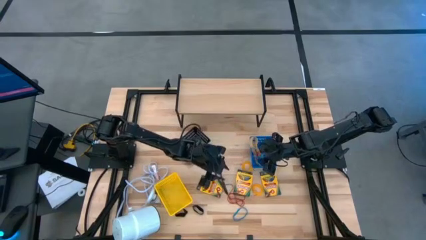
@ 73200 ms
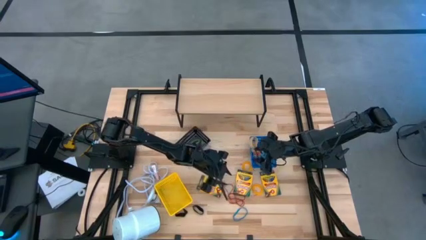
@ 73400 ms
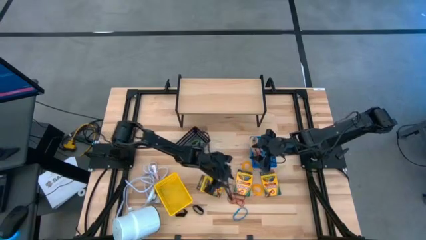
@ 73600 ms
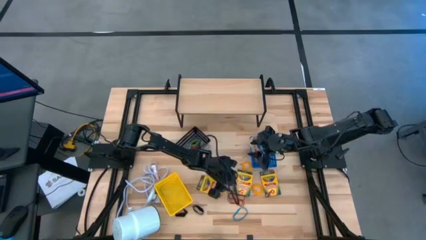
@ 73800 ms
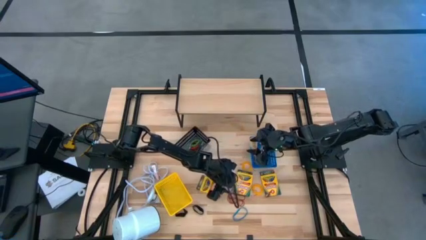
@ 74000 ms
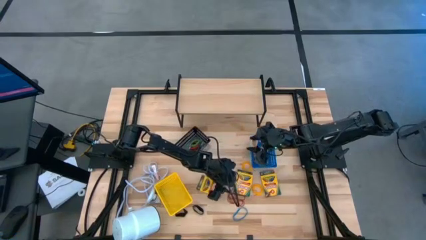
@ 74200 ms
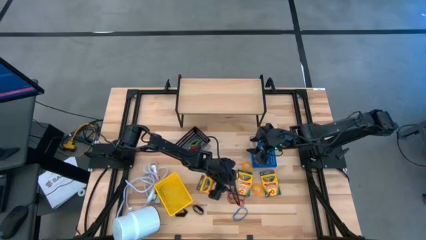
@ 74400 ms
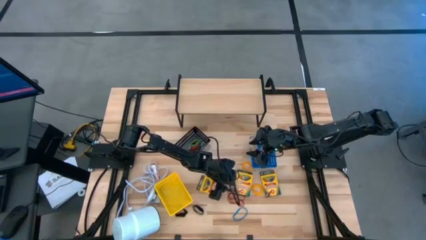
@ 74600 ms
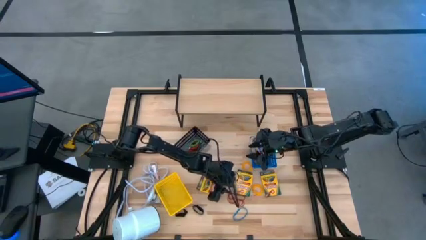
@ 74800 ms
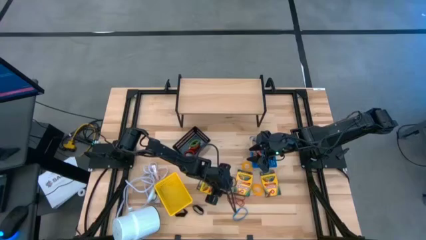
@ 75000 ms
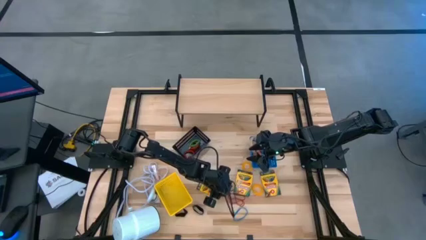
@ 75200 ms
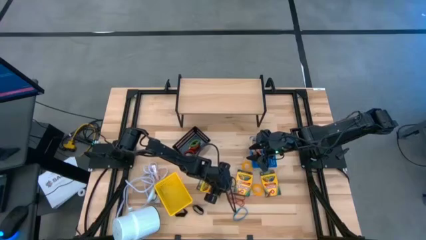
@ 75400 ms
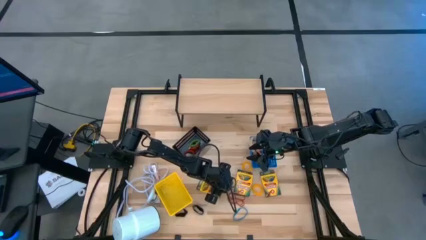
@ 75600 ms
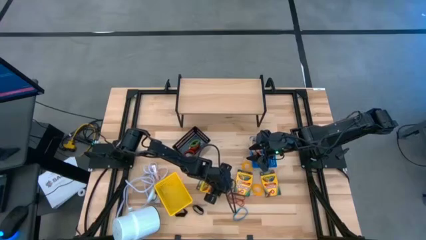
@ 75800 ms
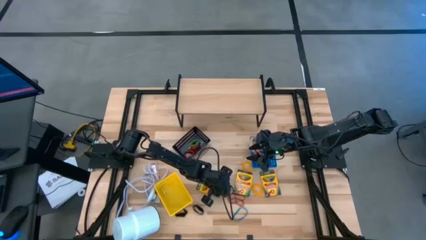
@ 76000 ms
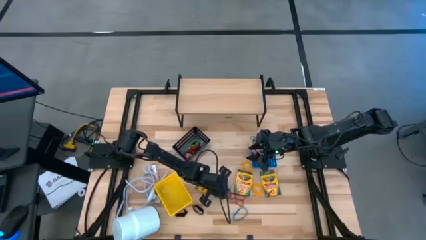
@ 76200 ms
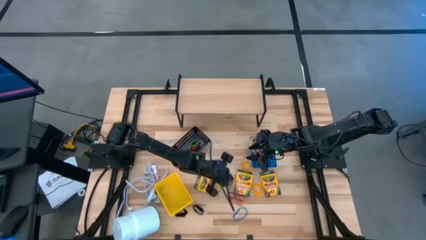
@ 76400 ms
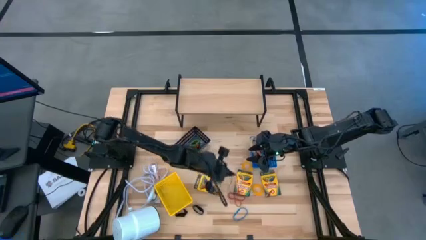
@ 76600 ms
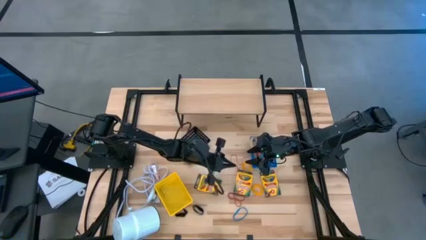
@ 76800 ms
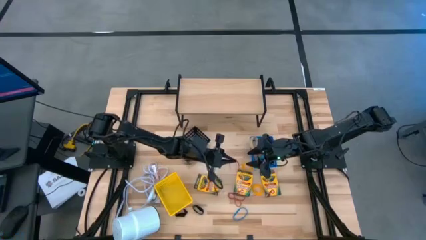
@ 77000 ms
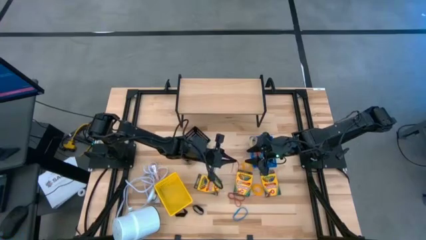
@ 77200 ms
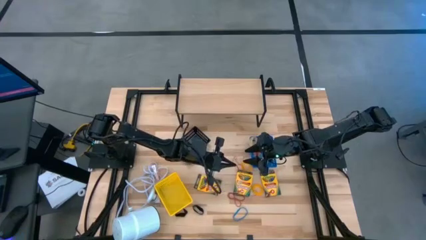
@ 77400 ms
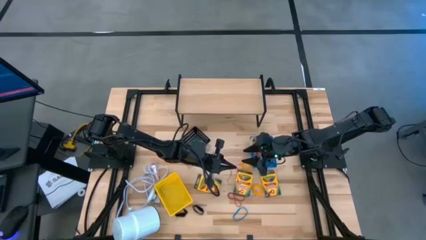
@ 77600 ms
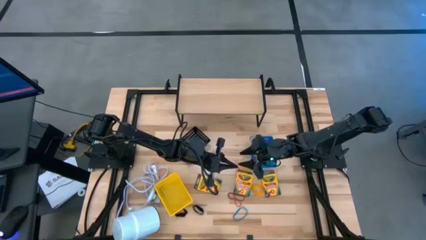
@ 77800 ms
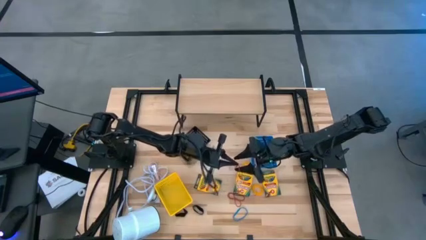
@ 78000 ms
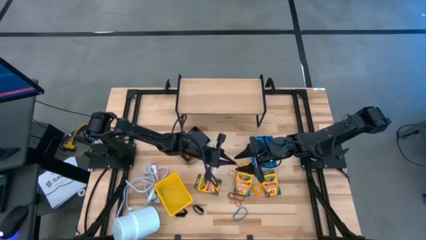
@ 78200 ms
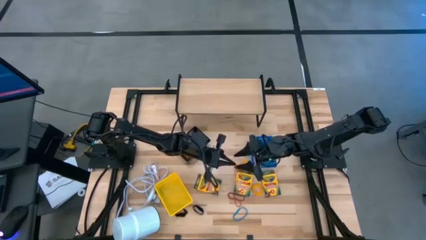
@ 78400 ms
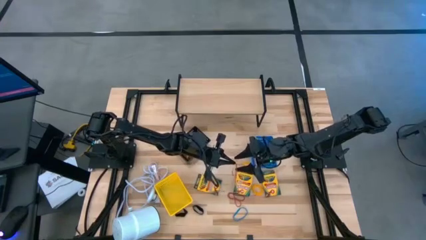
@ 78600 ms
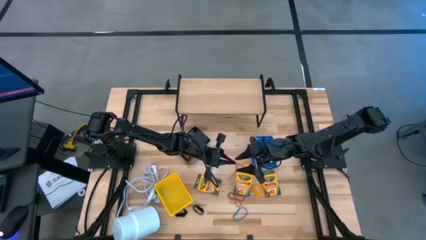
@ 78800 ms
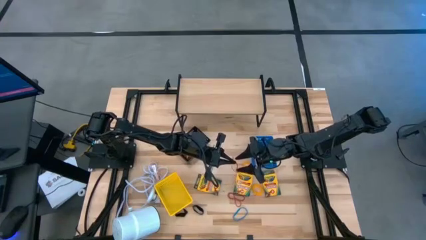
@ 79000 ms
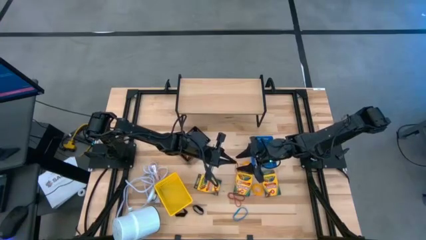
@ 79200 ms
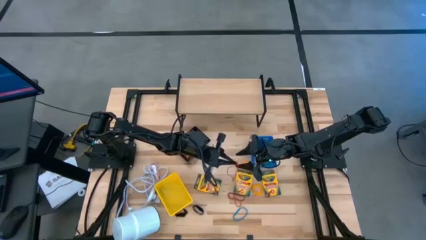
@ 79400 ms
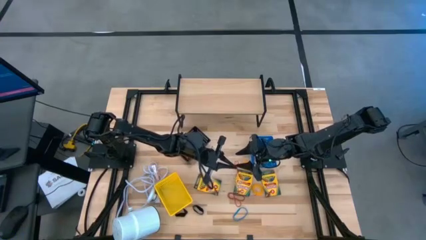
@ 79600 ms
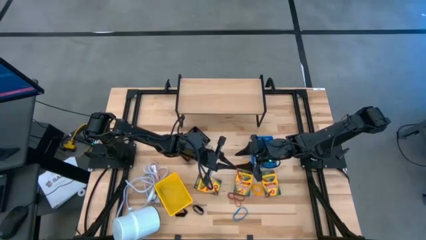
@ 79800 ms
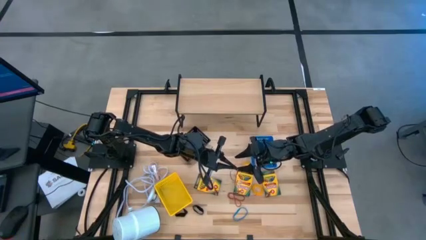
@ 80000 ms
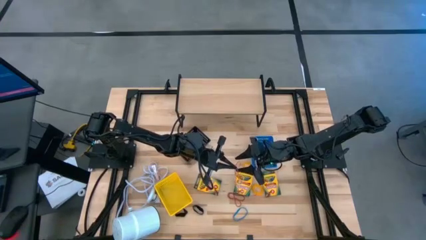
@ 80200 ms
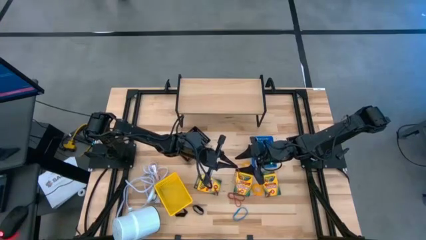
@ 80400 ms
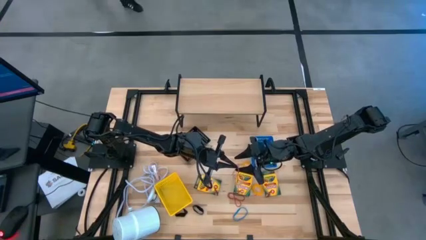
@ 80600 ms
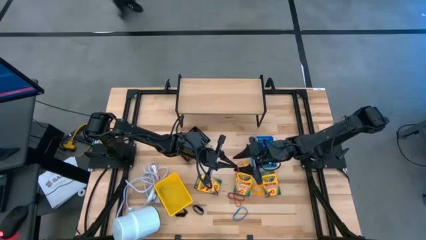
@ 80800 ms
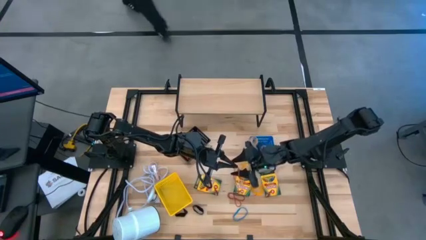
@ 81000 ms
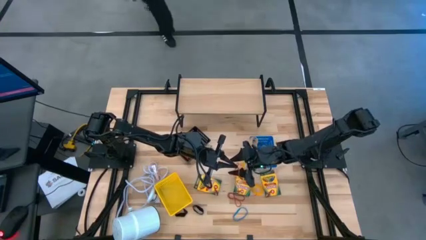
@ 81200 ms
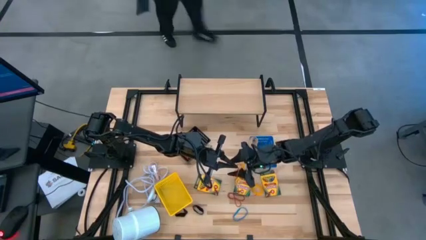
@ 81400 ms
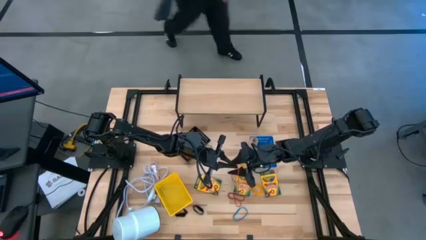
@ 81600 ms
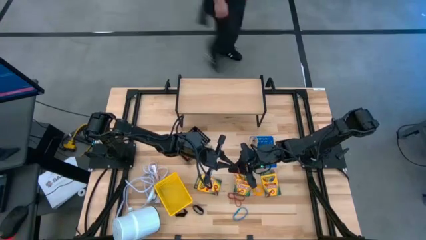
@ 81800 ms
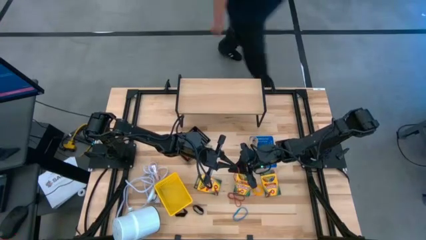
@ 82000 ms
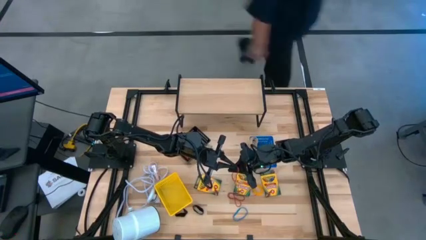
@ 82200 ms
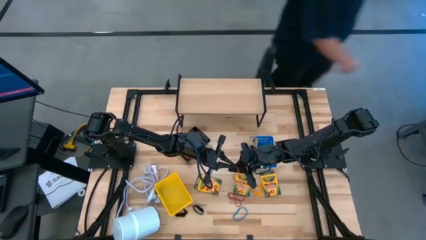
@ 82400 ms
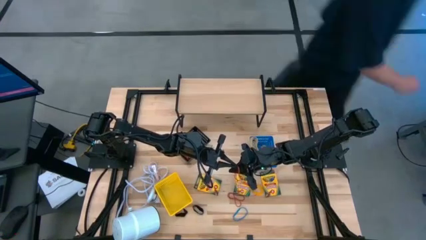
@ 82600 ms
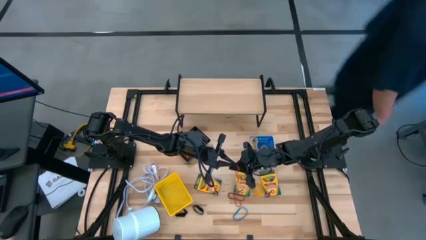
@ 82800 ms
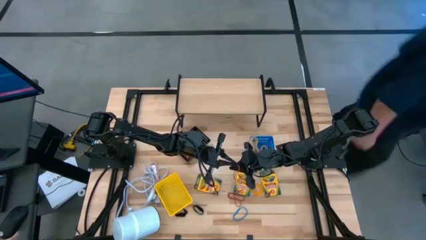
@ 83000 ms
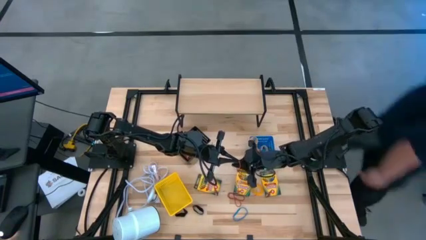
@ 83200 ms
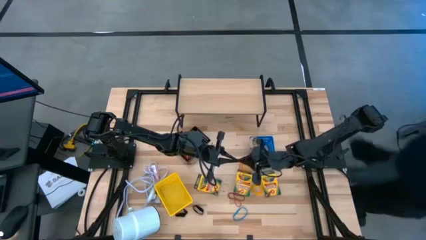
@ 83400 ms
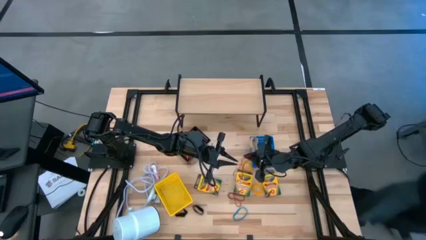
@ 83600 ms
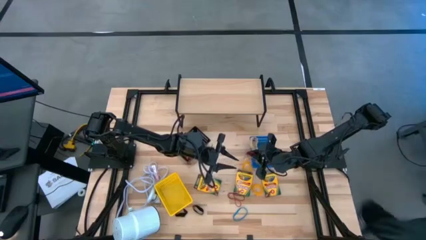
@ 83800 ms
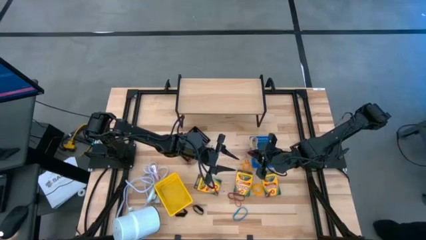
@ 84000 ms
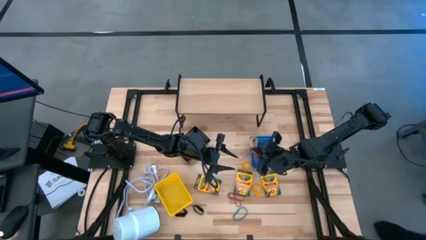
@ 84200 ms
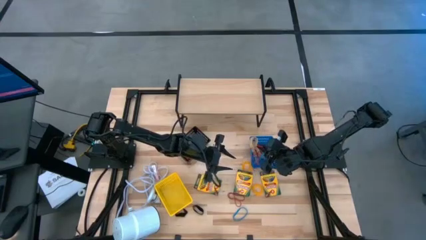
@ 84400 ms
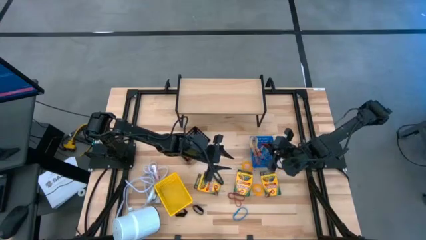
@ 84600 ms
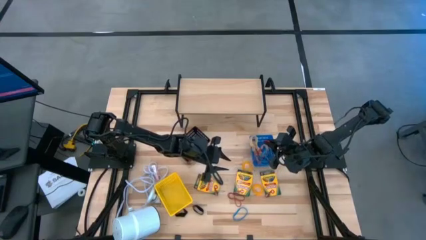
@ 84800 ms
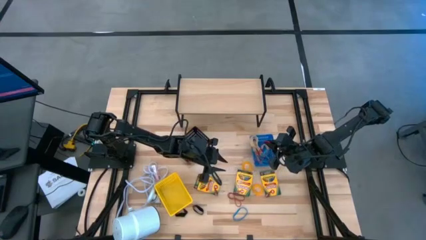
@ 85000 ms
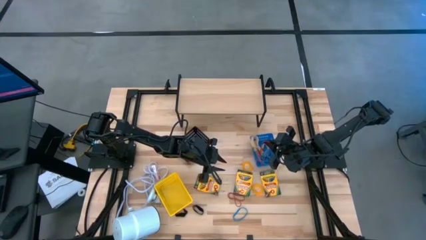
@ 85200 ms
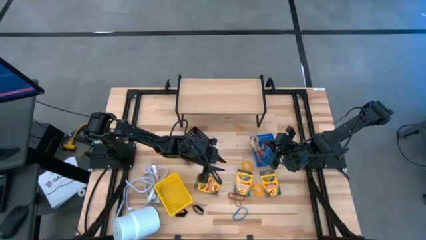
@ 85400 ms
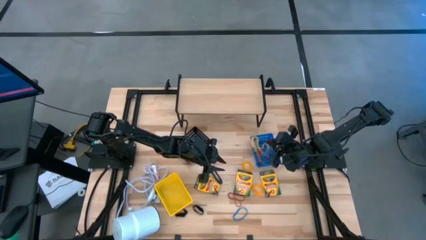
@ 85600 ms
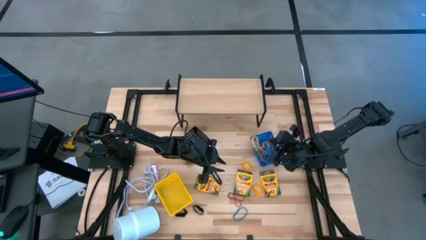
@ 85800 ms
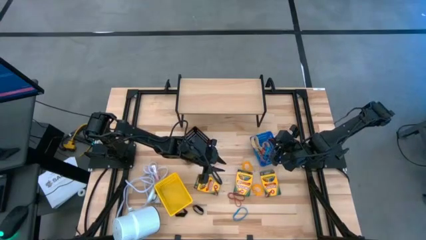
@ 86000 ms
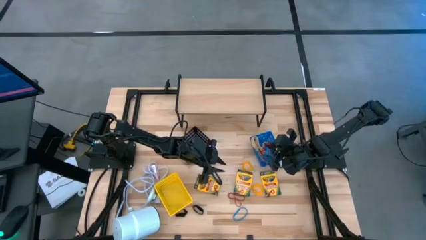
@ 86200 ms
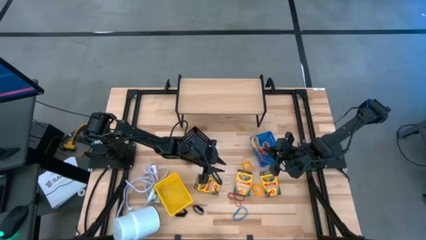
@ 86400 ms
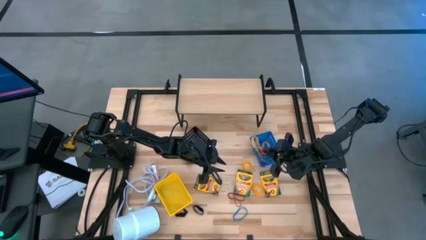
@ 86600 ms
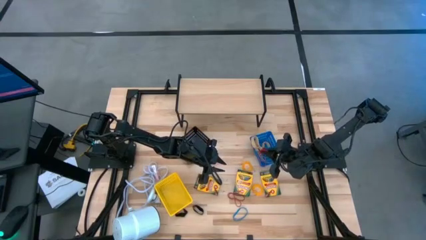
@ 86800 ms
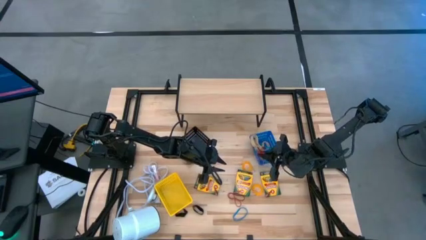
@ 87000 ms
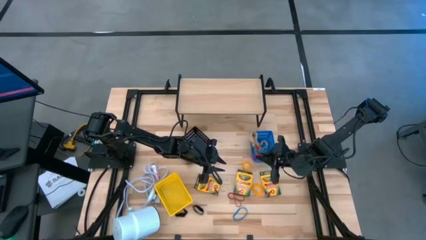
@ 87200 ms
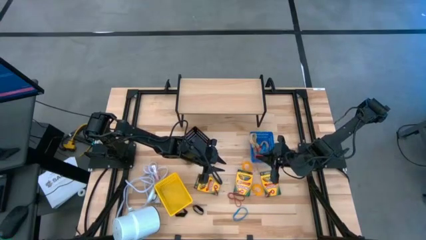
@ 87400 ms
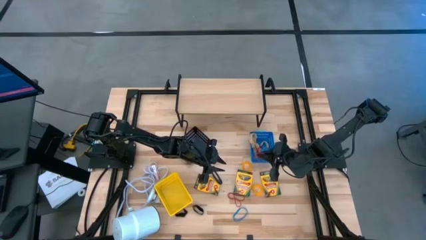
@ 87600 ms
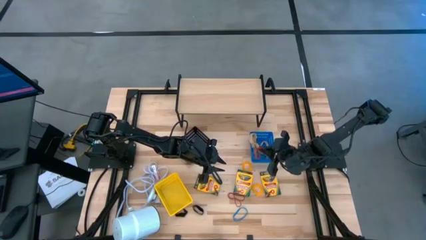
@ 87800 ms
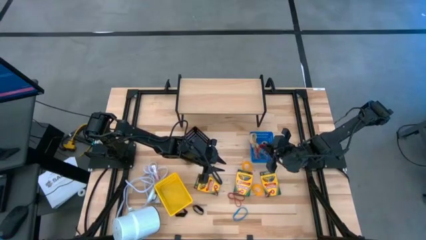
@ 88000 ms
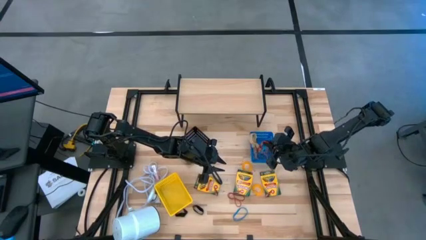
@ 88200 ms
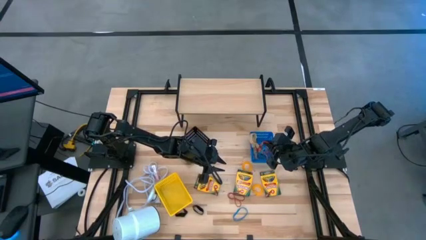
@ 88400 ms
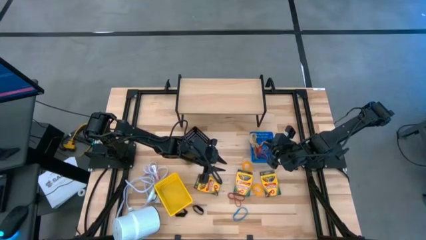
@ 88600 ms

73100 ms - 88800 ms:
Task: Pick & Place Office Desk Supplies
Put the red rubber band into the blue bin
